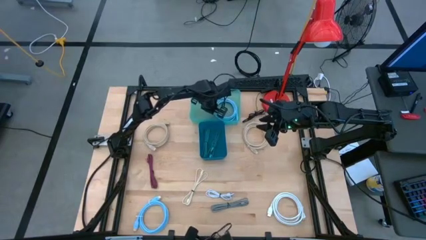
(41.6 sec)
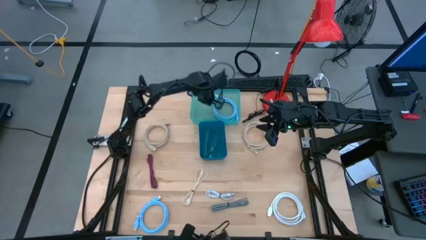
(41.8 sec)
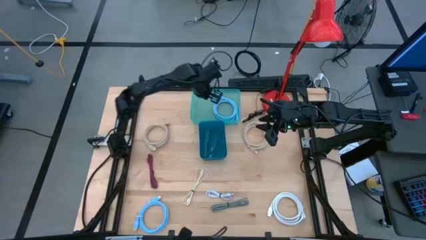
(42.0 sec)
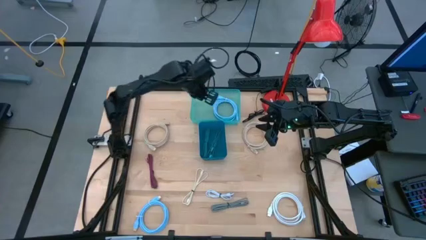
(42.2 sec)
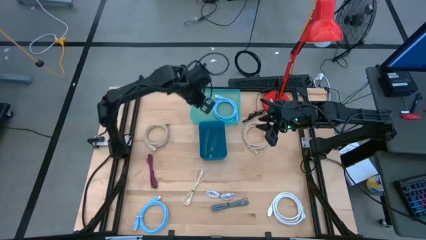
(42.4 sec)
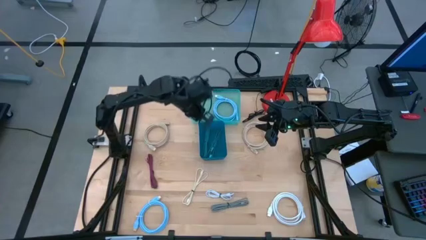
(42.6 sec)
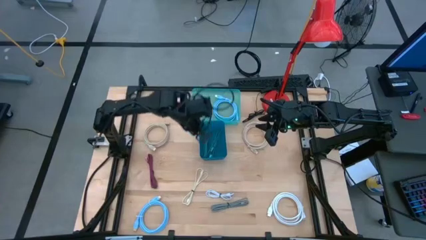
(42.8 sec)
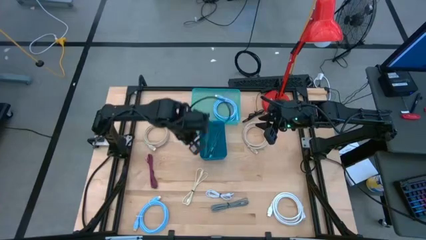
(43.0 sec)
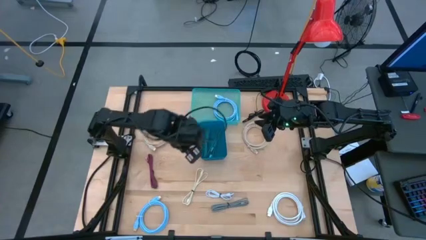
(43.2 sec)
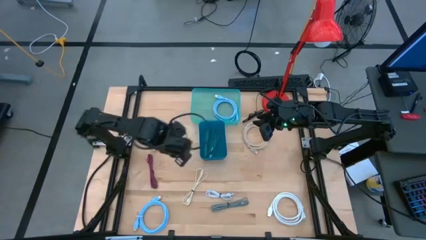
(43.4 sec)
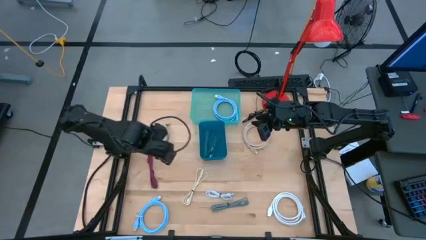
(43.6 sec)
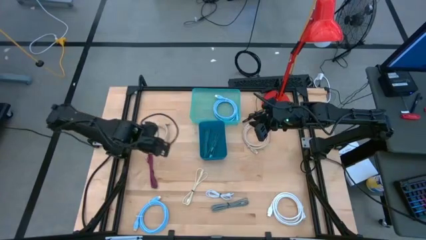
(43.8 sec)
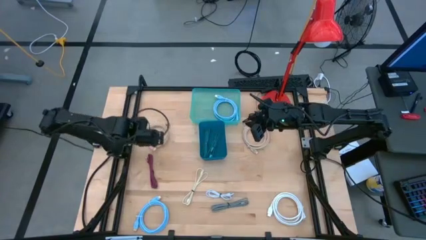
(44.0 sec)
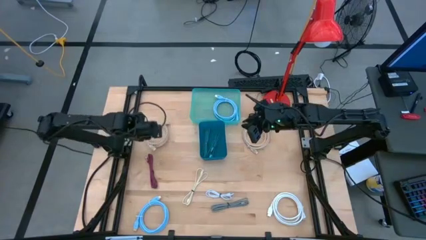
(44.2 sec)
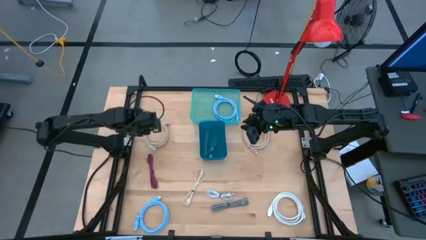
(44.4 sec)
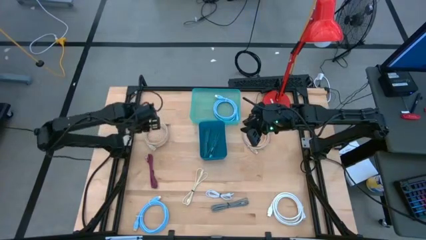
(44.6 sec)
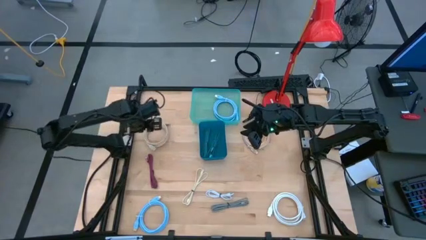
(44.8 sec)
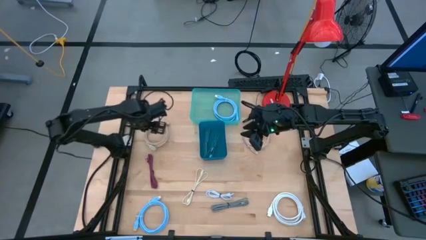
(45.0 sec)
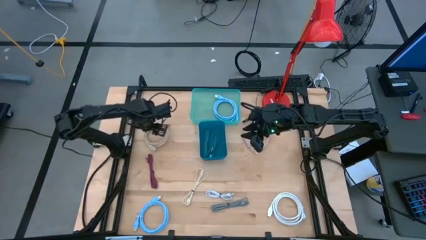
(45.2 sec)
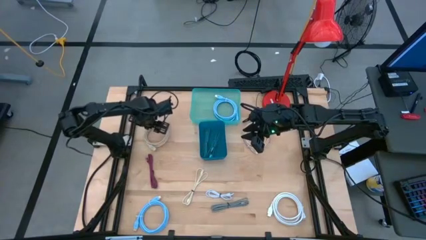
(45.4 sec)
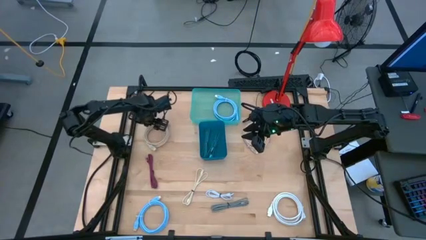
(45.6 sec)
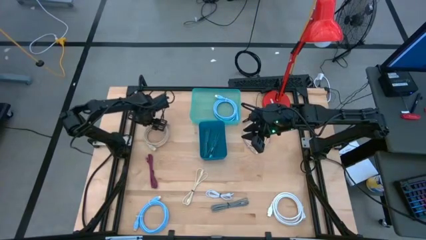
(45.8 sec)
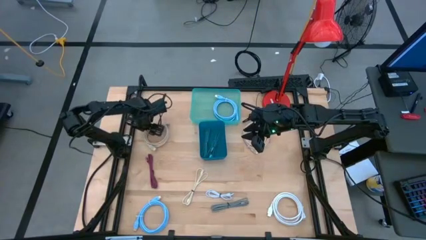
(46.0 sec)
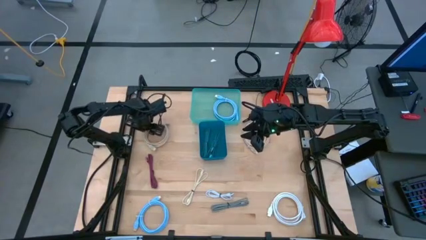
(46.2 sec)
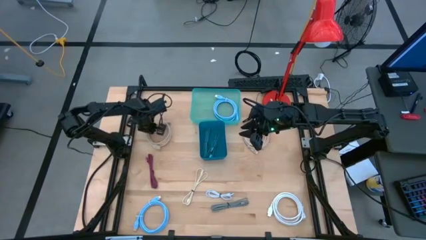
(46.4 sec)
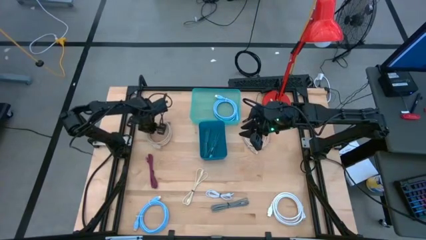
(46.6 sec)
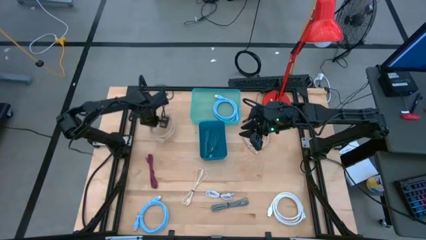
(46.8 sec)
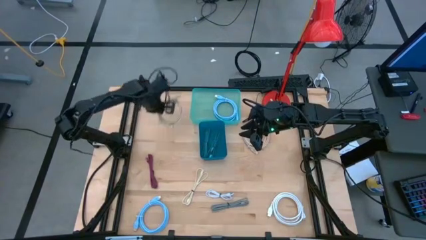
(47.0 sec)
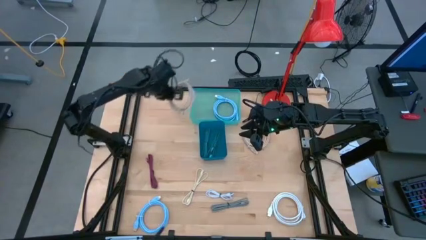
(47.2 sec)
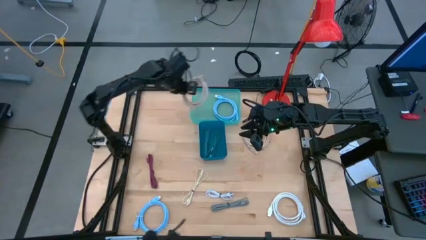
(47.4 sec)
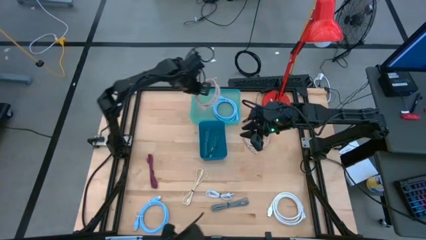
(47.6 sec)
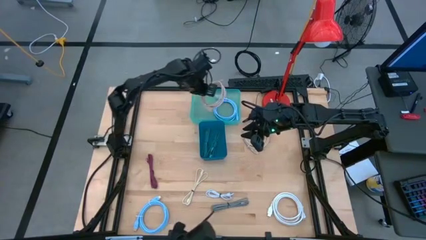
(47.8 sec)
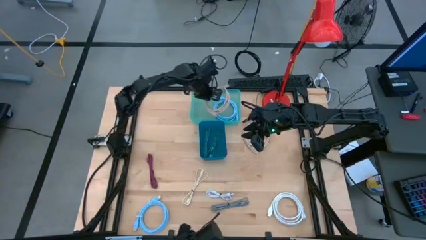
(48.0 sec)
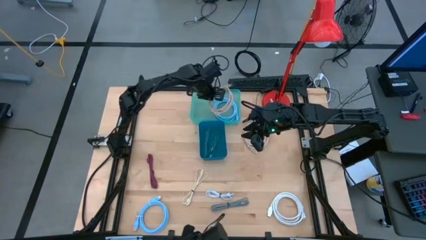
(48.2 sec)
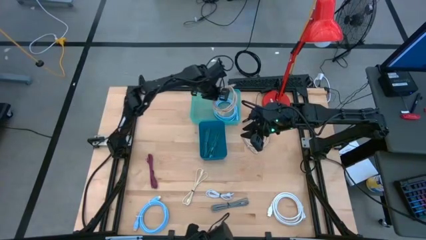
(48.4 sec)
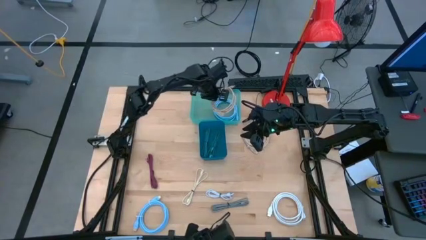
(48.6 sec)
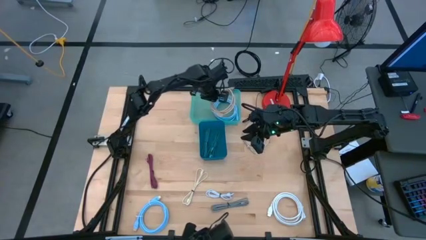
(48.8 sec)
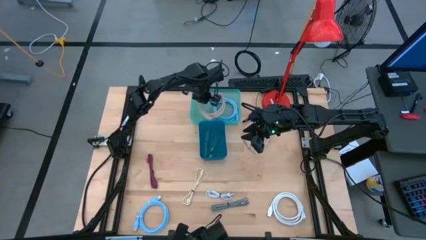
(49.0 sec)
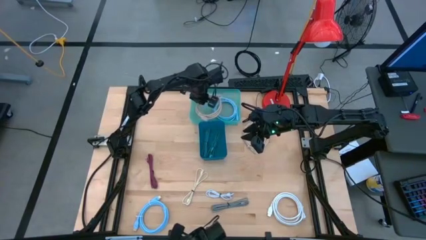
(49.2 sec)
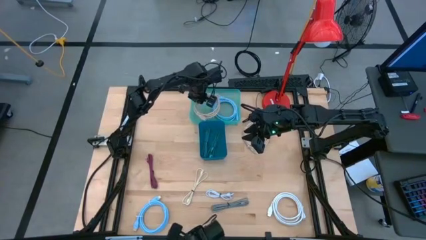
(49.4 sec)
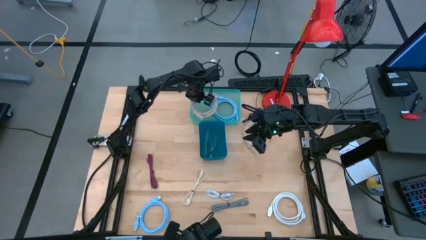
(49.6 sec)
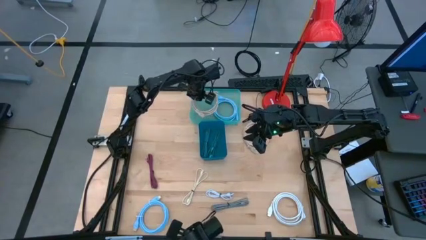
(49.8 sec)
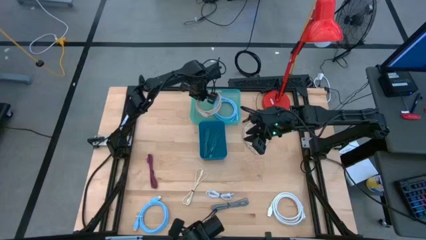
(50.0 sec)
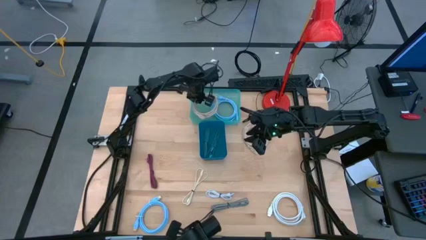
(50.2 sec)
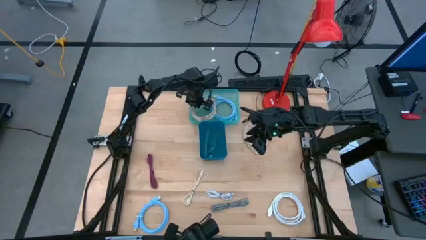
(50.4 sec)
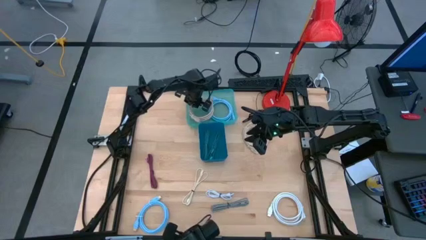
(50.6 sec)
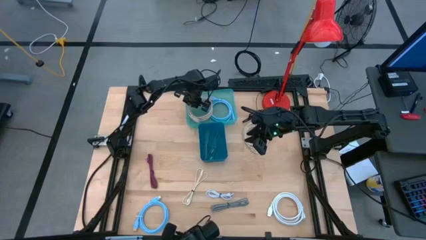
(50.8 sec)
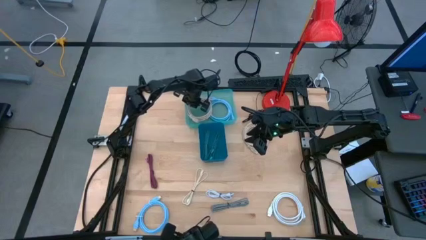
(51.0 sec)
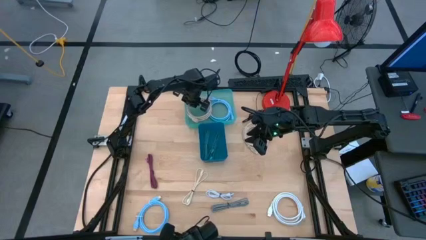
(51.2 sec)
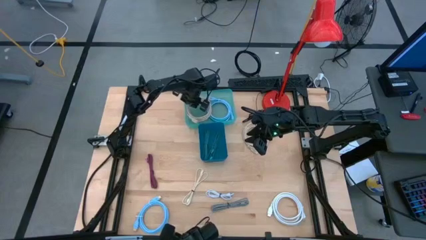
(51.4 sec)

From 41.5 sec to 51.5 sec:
Task: Pick & Place USB Port
Put the left brown hdmi cable into the green bin

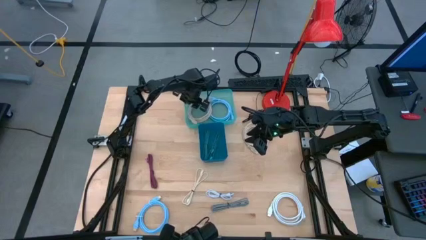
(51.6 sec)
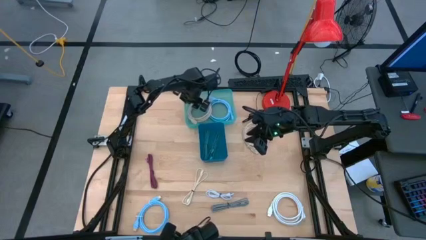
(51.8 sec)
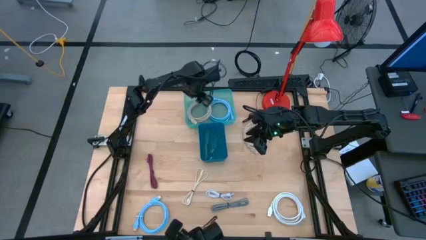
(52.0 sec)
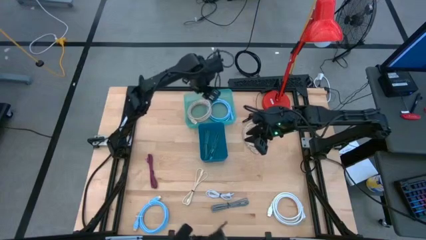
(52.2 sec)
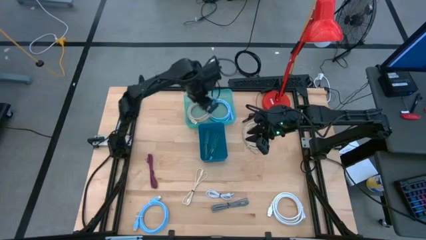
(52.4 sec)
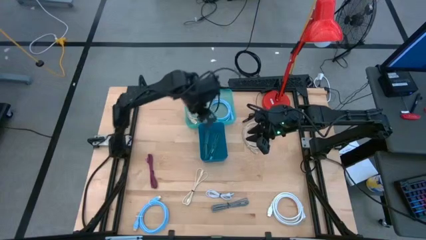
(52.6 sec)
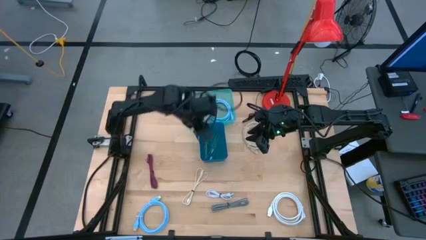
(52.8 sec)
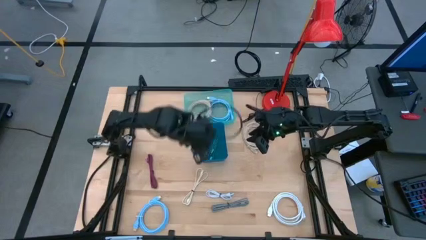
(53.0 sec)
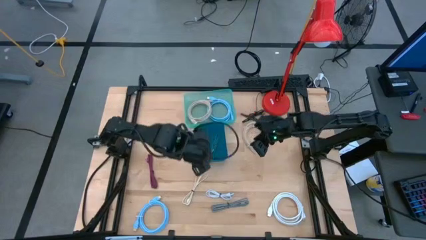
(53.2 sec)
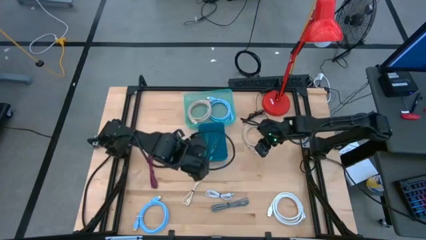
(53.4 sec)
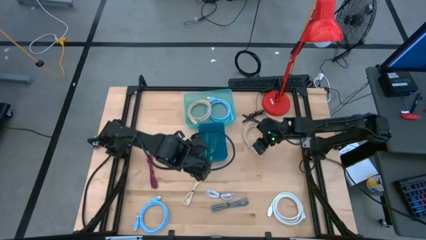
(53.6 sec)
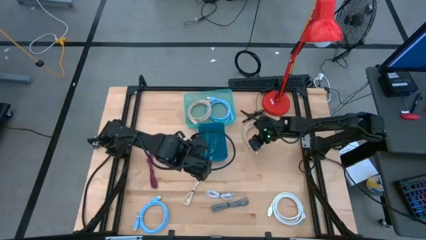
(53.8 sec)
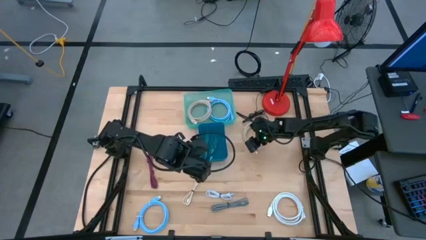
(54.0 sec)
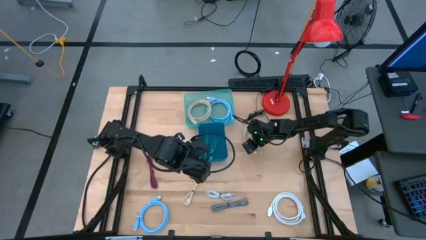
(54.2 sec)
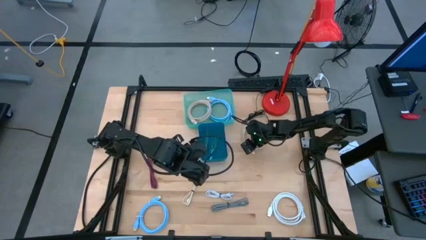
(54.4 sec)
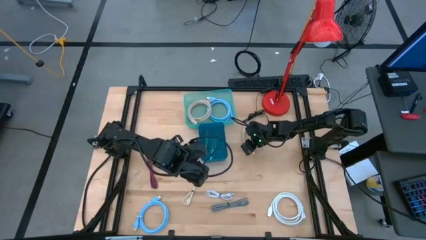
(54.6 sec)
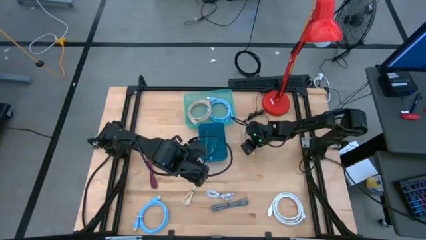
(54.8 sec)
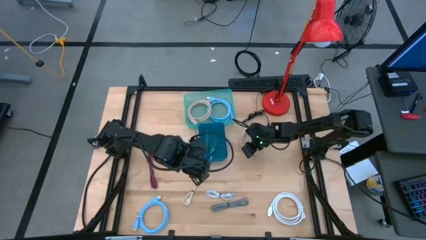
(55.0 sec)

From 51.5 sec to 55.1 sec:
Put the brown hdmi cable into the green bin

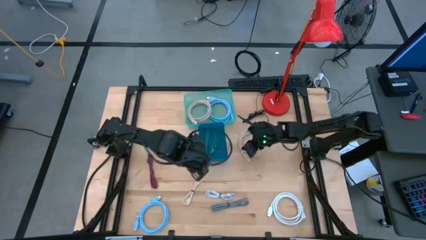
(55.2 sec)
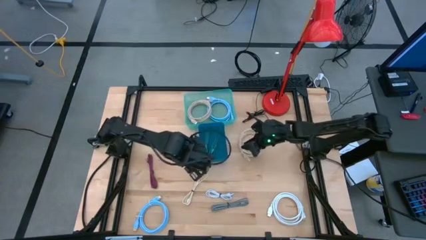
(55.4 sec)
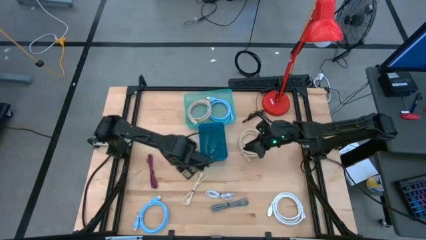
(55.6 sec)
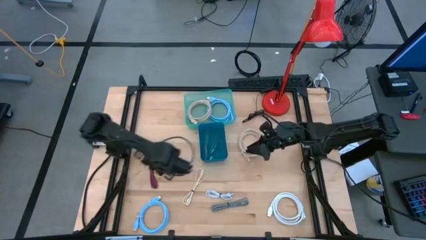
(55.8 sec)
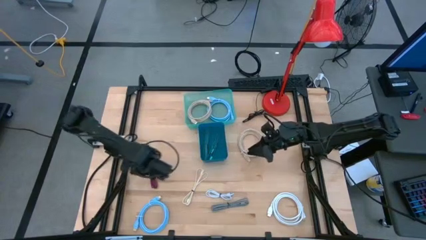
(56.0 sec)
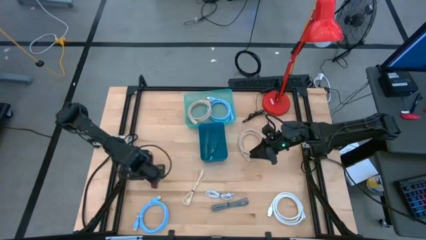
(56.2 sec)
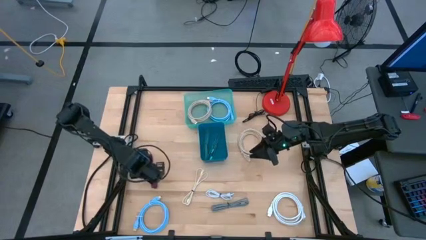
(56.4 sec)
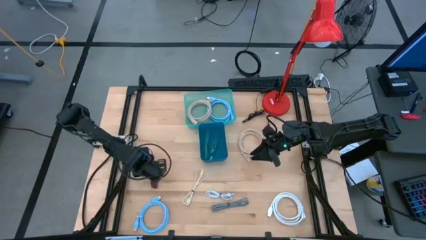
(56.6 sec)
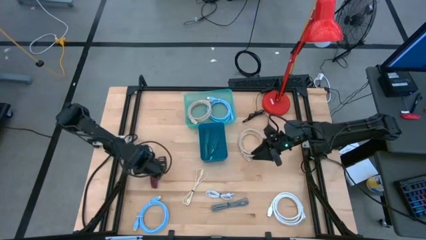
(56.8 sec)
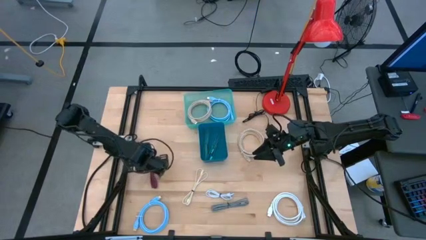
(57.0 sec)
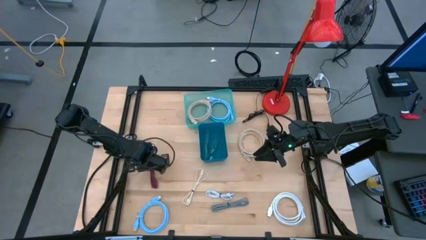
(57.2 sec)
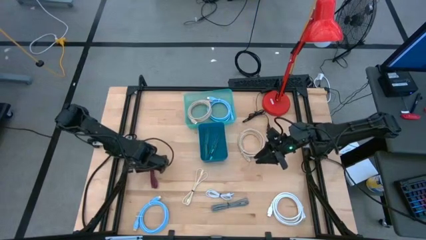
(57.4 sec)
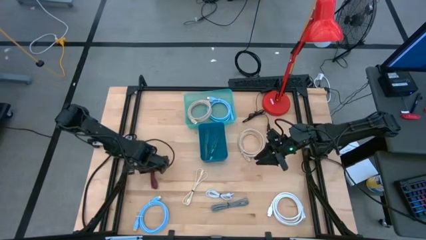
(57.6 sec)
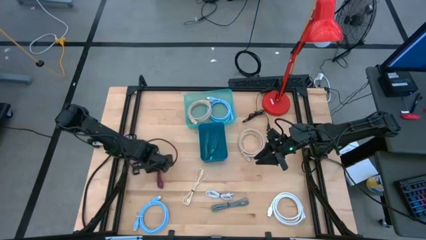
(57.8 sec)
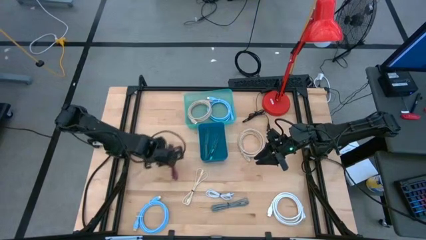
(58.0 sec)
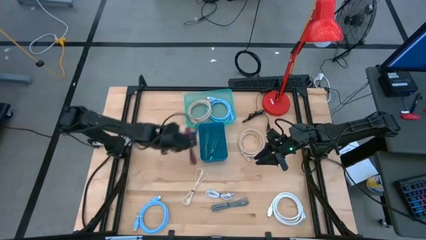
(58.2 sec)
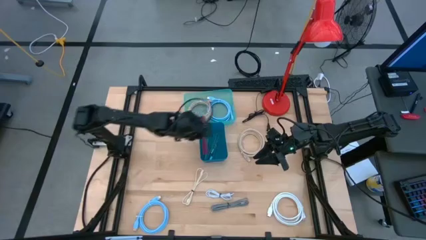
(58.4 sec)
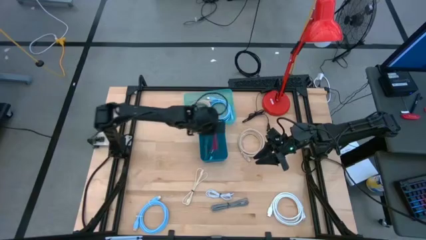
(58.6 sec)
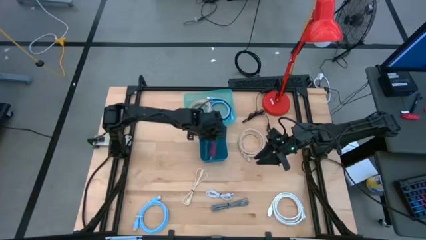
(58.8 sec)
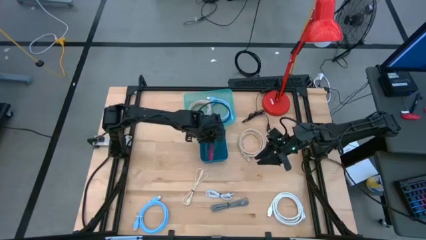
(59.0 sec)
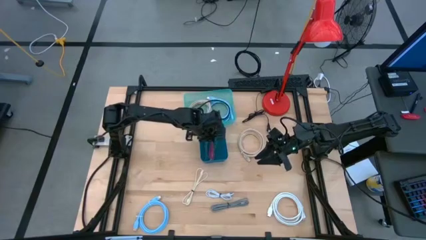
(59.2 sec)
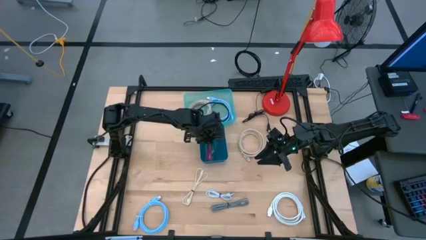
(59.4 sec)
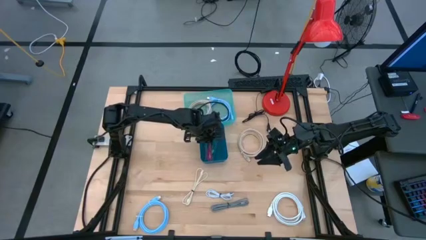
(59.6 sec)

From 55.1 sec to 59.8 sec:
Put the pink usb cable into the blue bin
